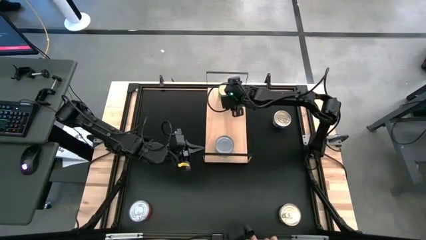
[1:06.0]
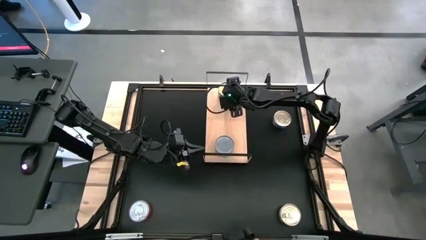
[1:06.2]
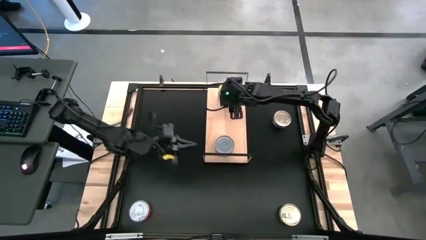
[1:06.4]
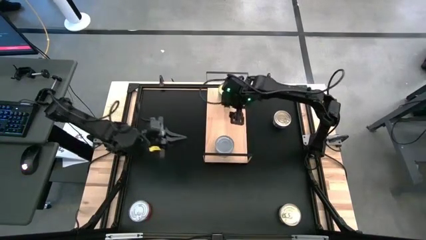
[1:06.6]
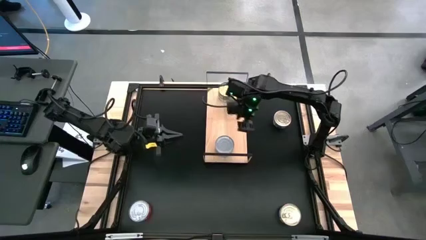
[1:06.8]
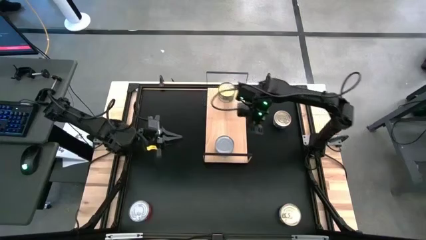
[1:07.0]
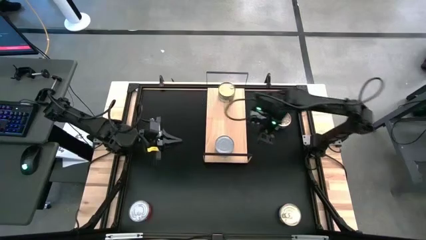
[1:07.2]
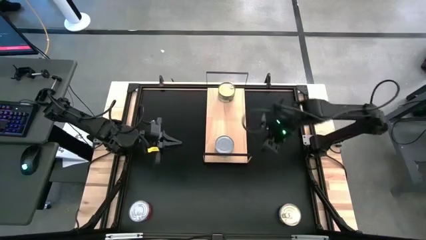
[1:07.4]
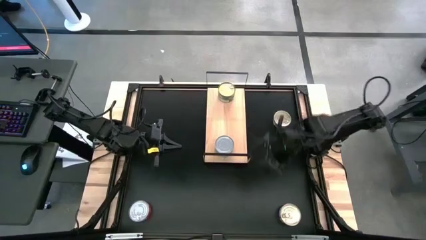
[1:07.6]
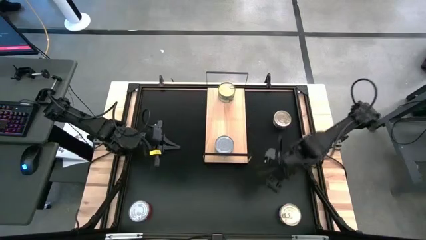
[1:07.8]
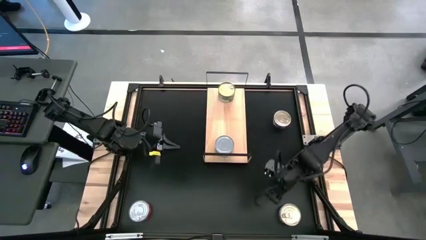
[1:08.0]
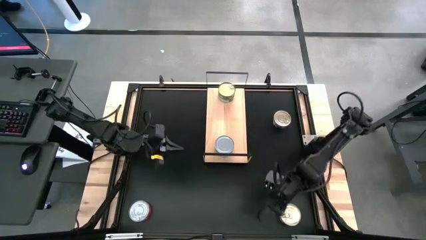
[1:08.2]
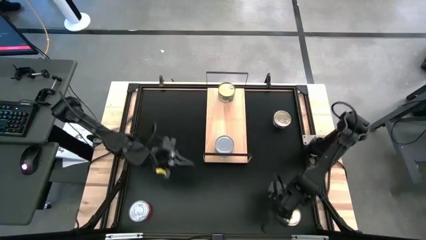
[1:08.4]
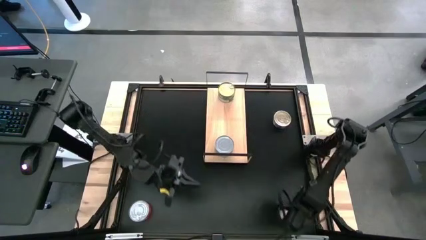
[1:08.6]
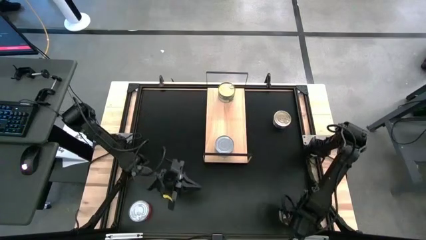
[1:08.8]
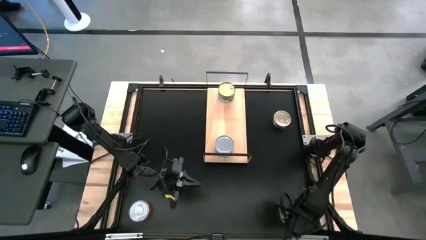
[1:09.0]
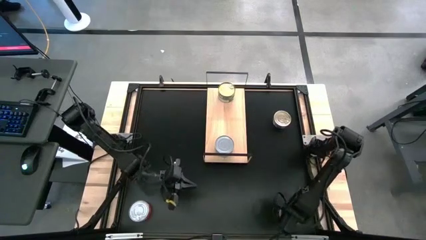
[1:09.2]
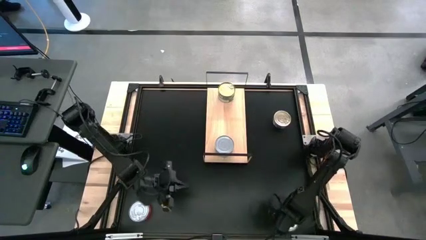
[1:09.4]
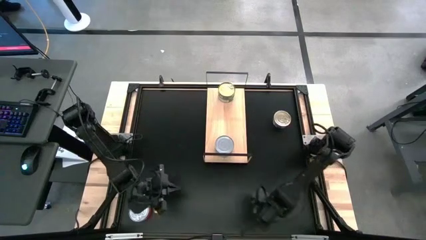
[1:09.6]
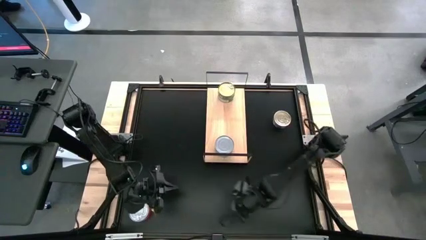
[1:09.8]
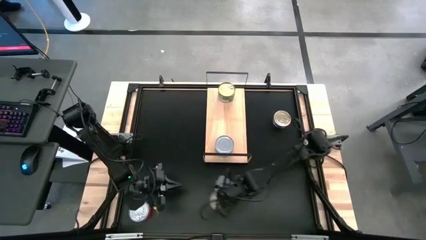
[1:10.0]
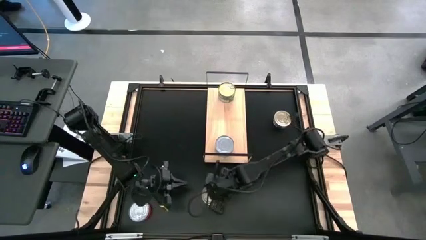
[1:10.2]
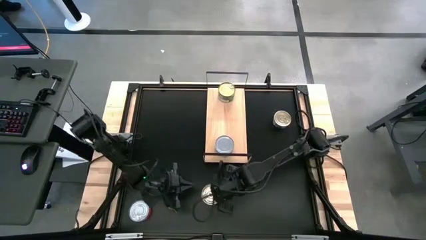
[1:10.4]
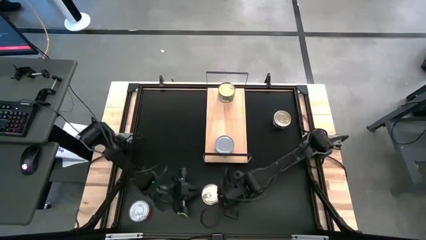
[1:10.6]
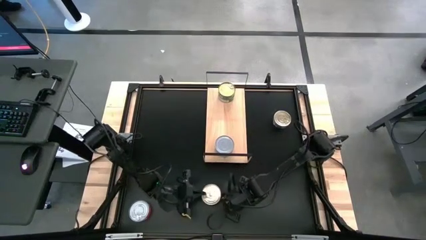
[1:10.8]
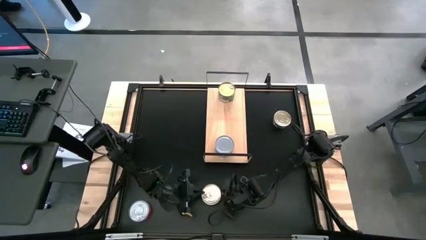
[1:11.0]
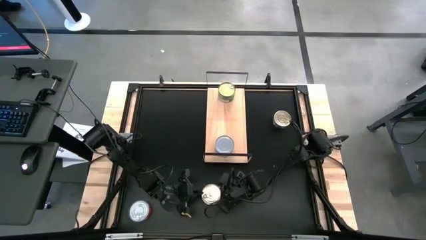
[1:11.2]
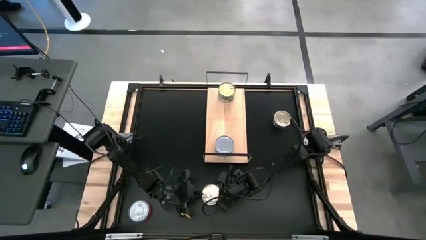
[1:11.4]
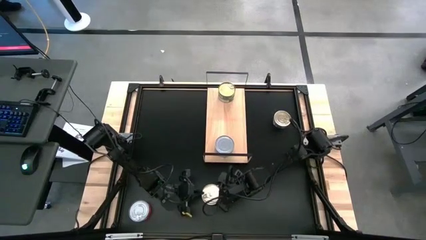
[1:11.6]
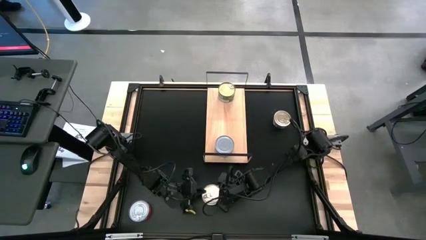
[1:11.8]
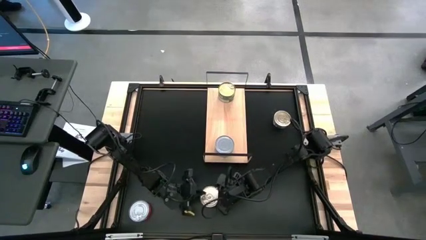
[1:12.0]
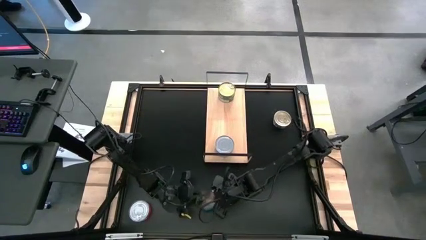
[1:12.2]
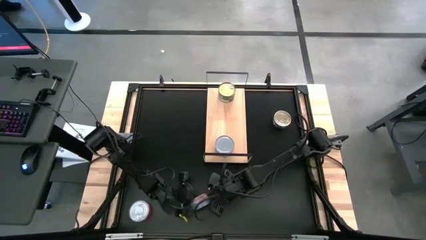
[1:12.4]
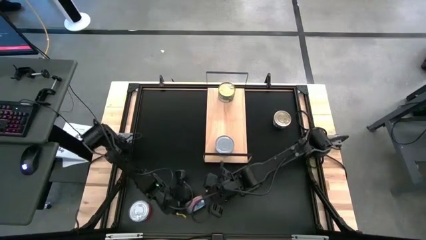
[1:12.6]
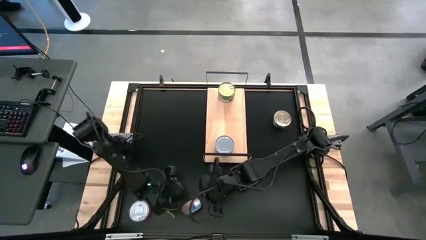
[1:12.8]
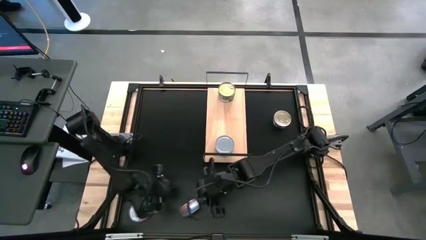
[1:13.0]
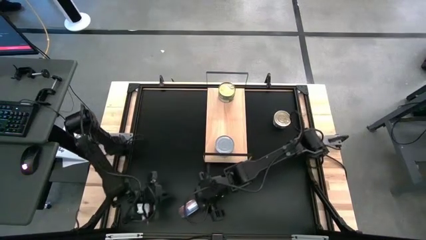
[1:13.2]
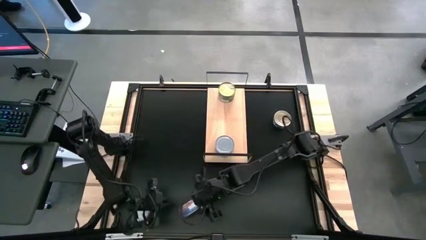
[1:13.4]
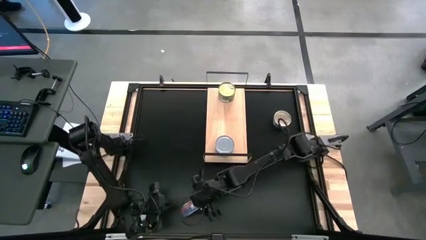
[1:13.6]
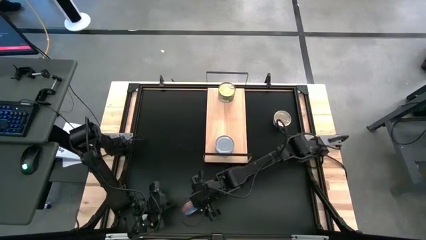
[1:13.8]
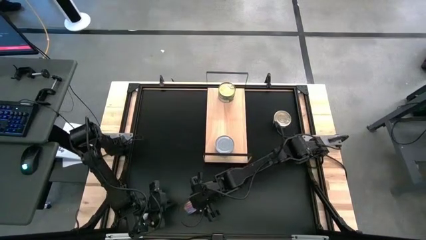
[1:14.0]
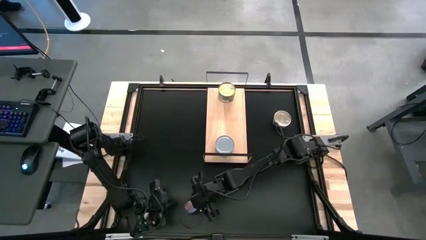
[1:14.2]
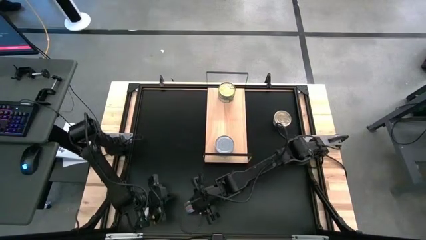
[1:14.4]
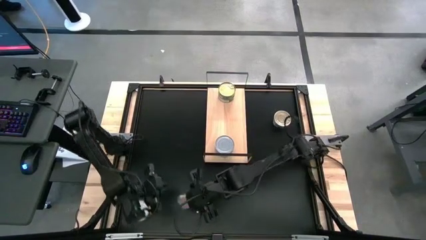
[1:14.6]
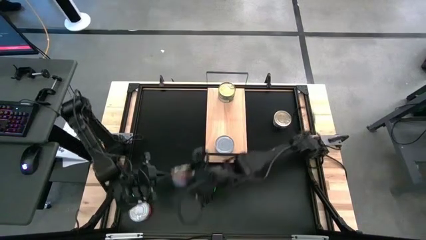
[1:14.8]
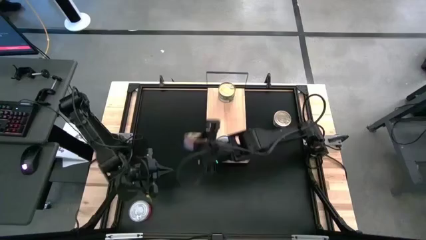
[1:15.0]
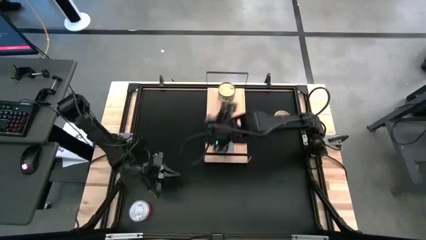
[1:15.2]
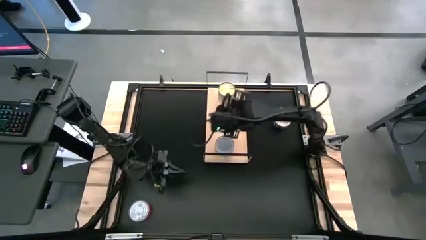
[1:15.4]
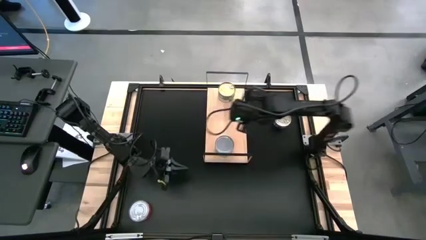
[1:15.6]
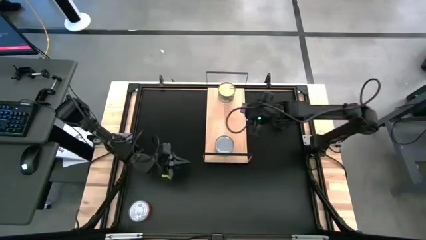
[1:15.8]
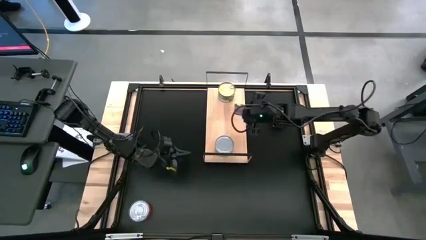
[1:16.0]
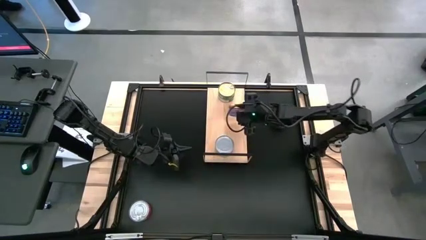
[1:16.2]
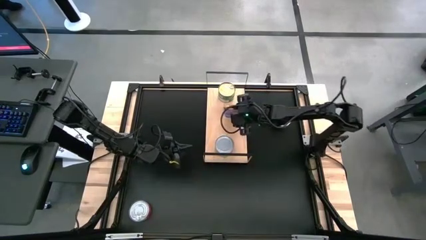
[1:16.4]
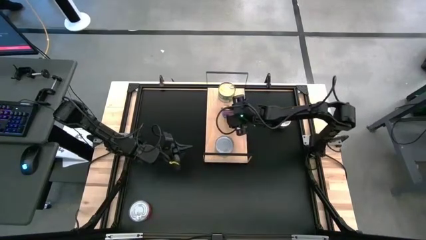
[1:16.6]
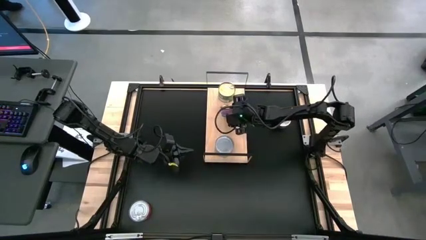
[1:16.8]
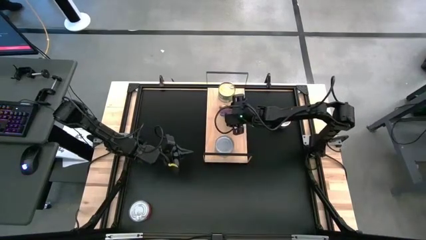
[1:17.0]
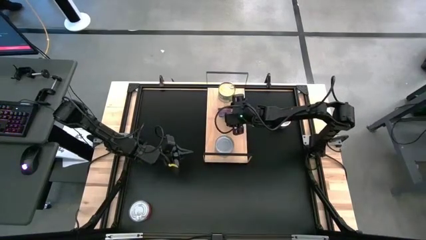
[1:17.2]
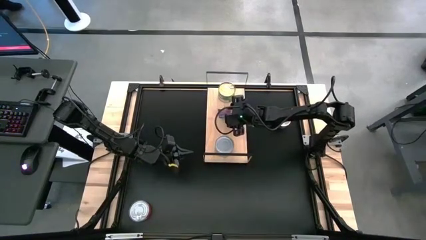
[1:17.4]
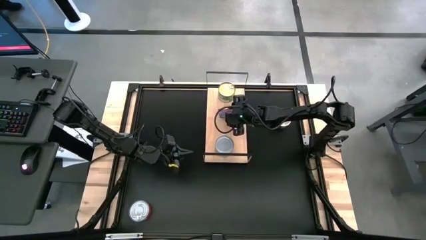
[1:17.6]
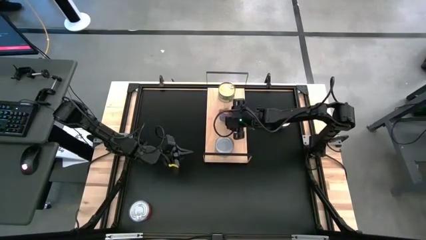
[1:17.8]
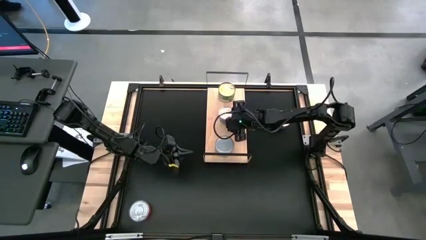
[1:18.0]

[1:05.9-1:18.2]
Task: Stack canned seafood by type on shelf
Put the blue-pink tuna can on the shelf
